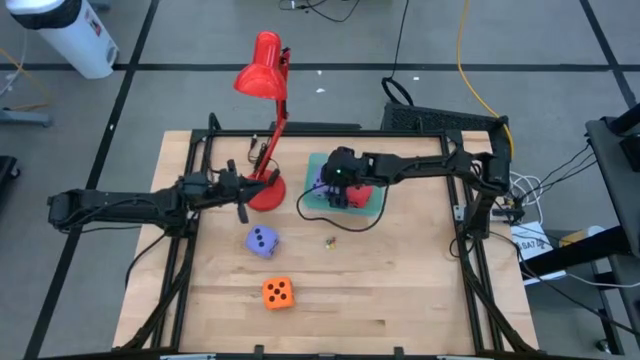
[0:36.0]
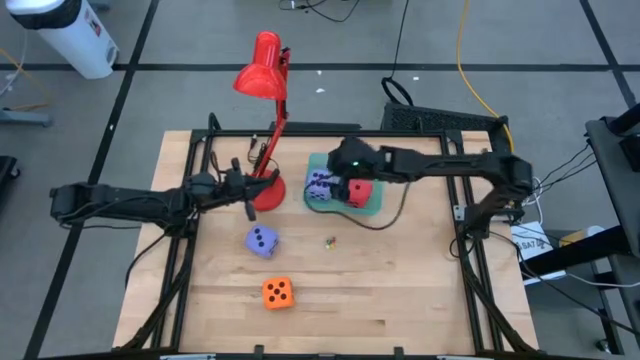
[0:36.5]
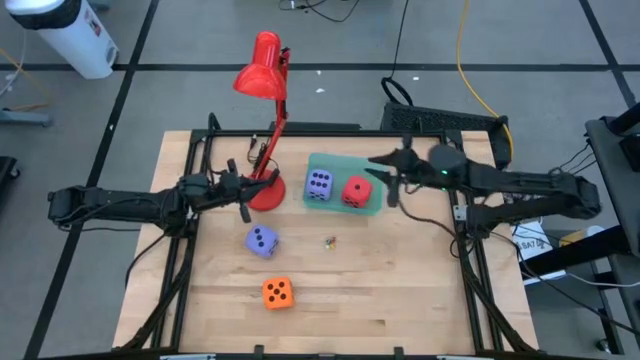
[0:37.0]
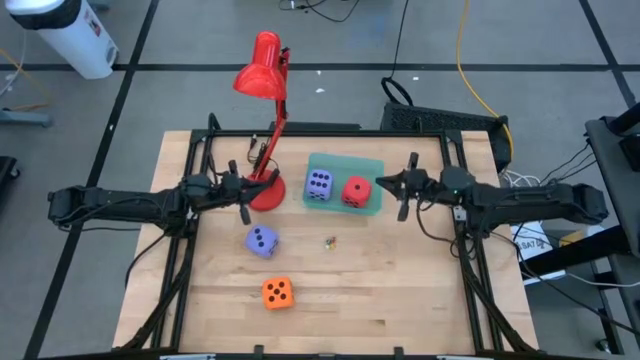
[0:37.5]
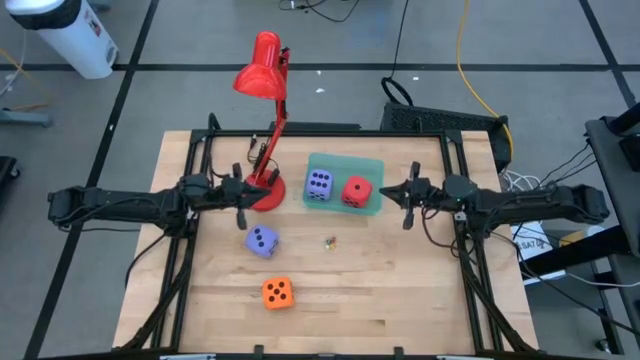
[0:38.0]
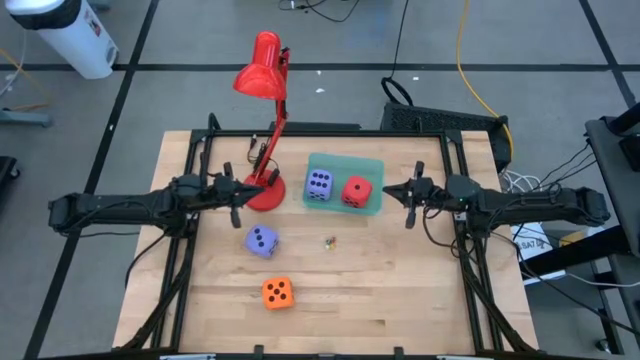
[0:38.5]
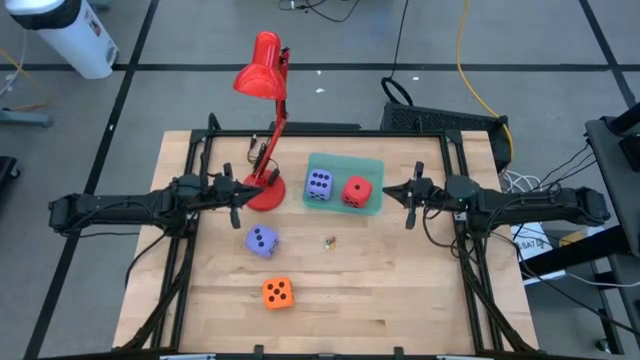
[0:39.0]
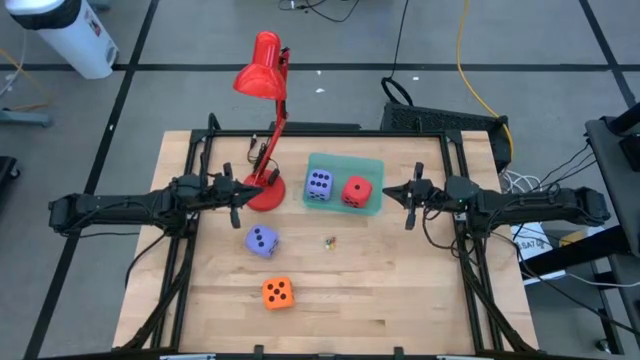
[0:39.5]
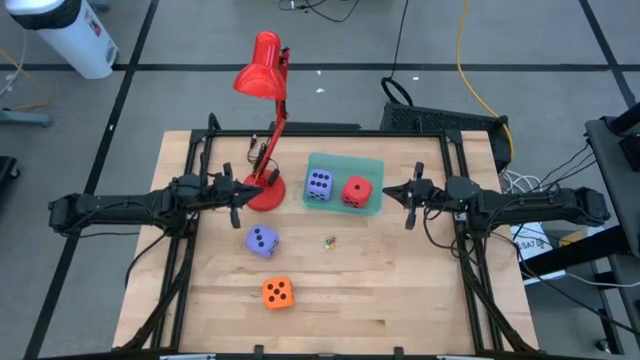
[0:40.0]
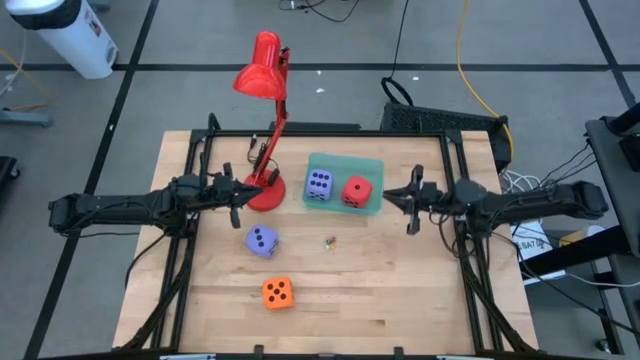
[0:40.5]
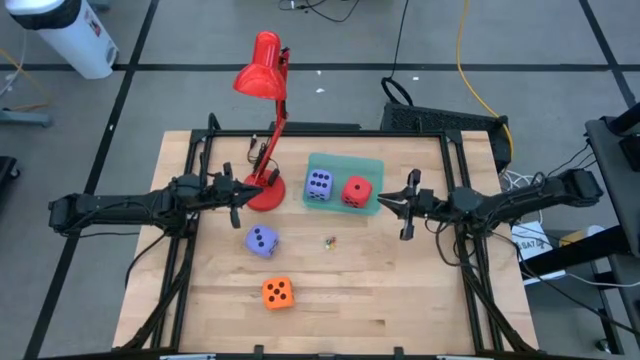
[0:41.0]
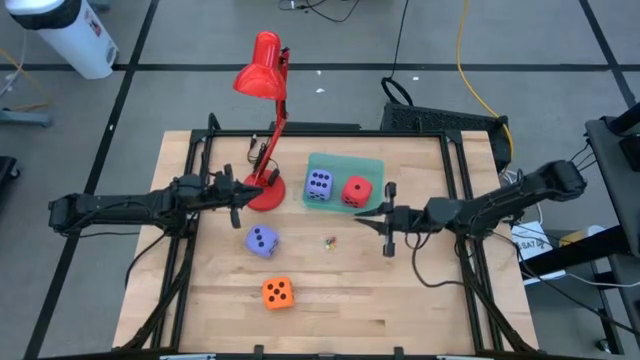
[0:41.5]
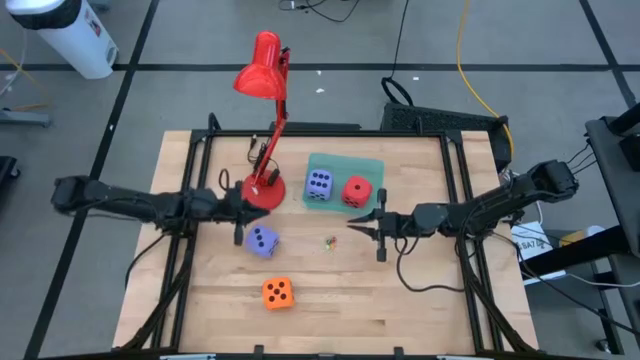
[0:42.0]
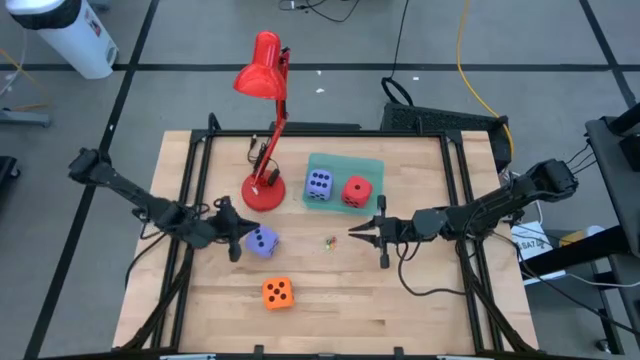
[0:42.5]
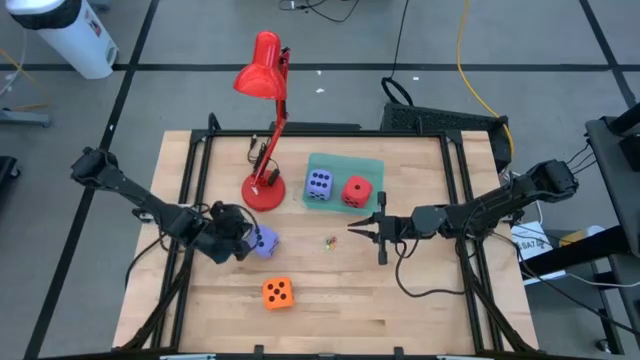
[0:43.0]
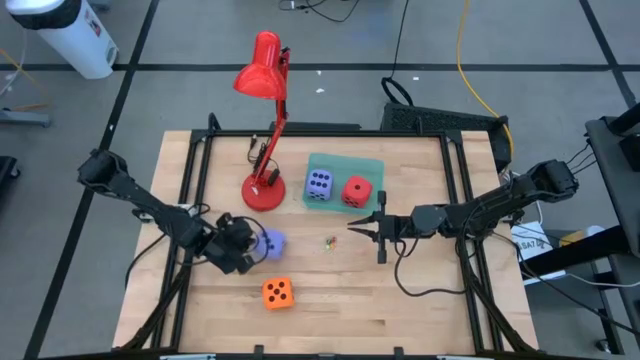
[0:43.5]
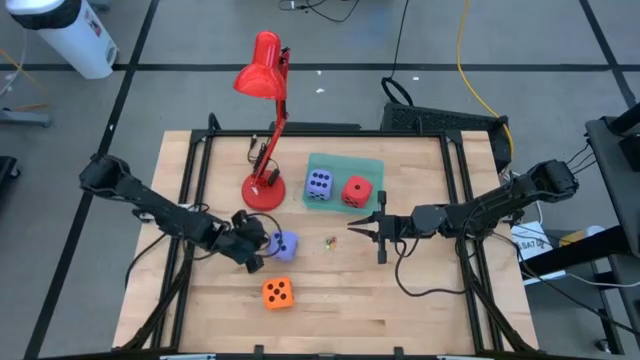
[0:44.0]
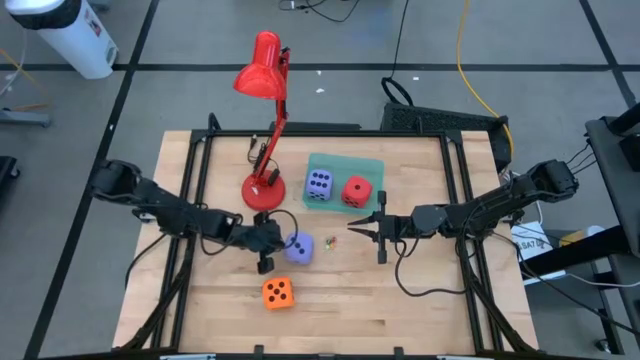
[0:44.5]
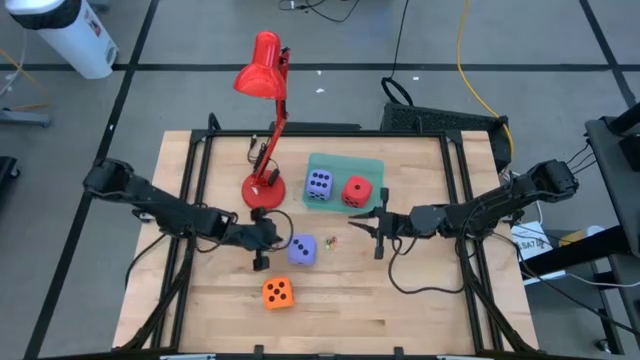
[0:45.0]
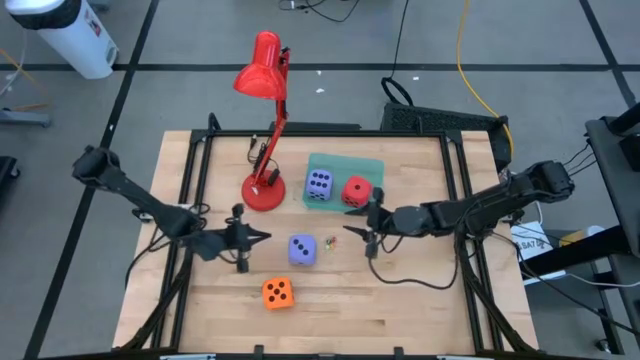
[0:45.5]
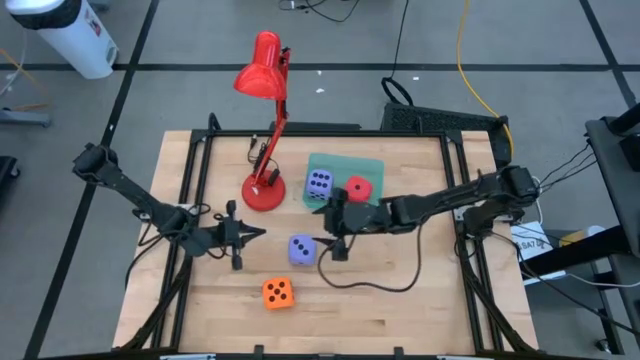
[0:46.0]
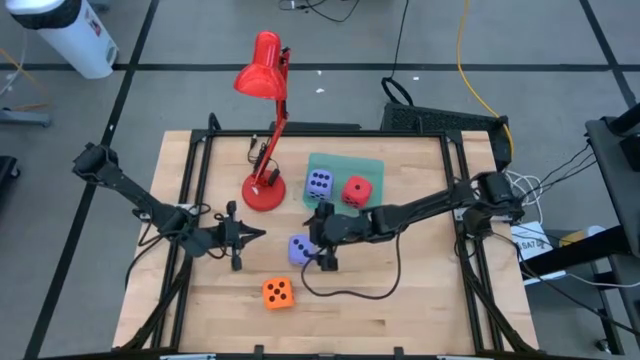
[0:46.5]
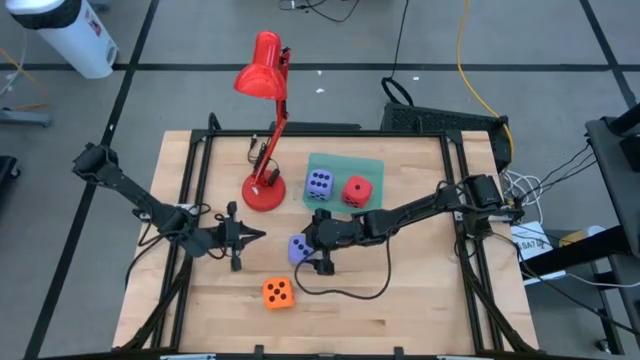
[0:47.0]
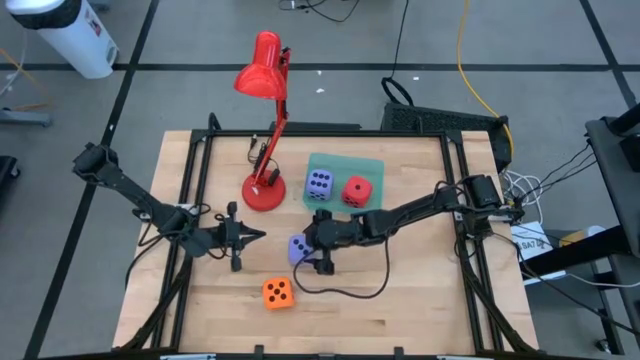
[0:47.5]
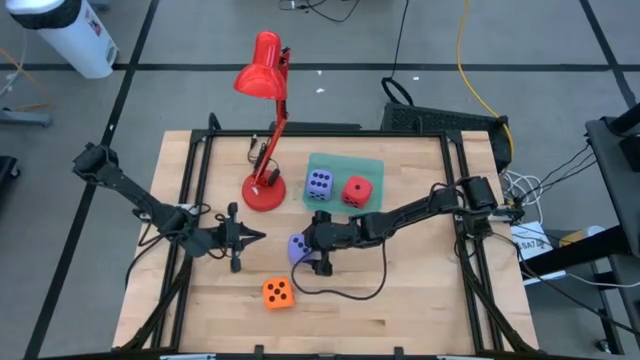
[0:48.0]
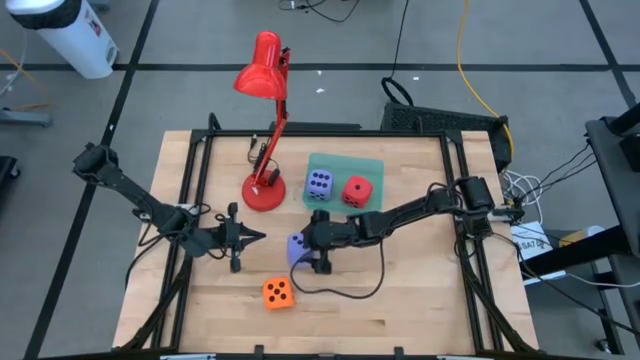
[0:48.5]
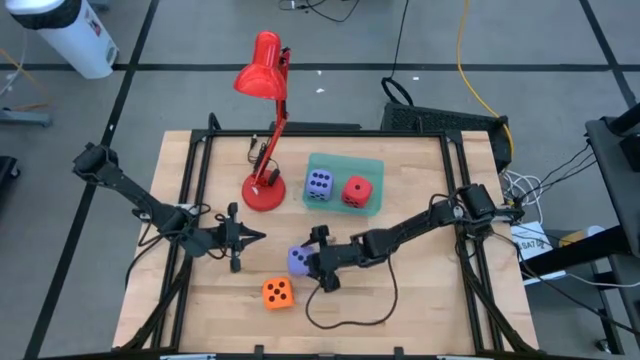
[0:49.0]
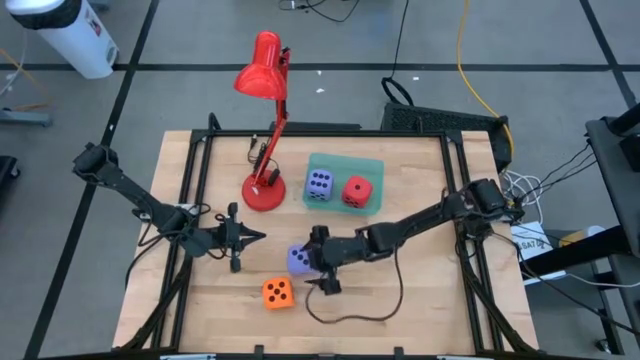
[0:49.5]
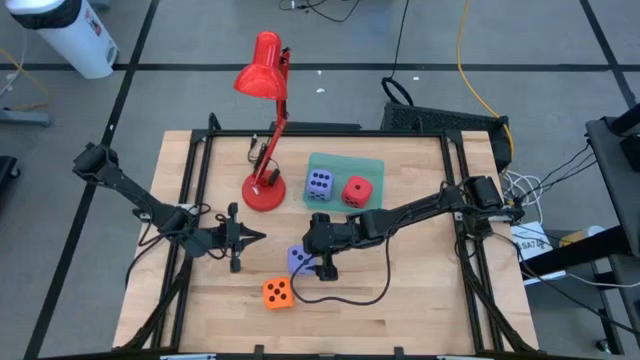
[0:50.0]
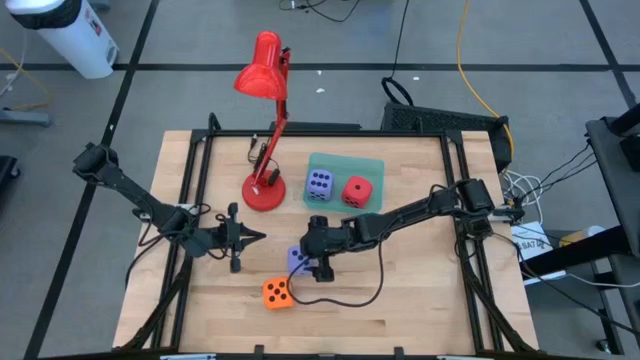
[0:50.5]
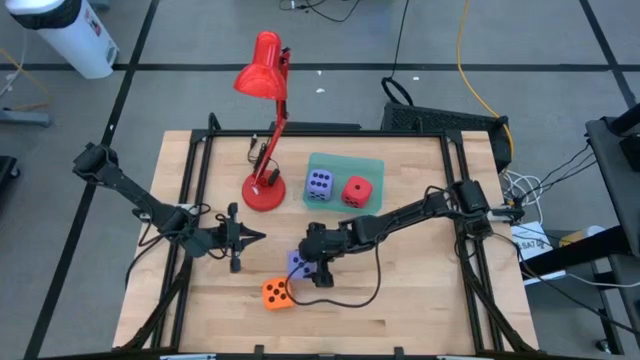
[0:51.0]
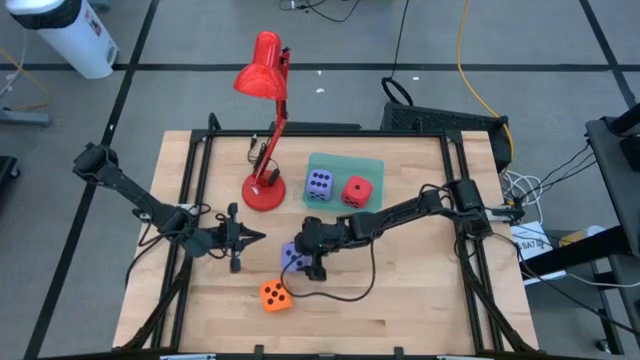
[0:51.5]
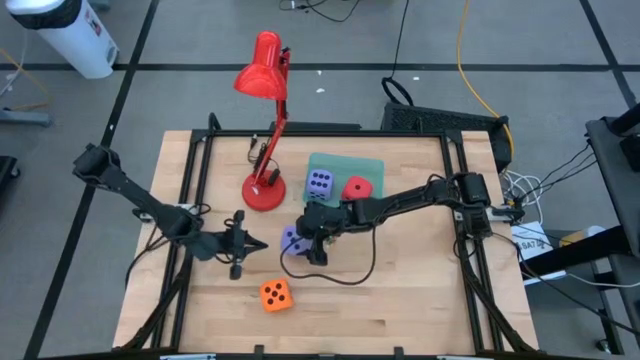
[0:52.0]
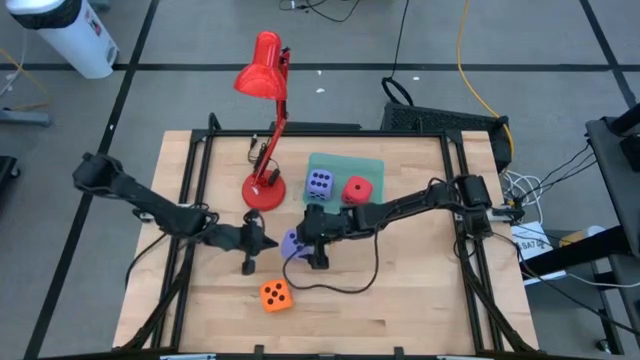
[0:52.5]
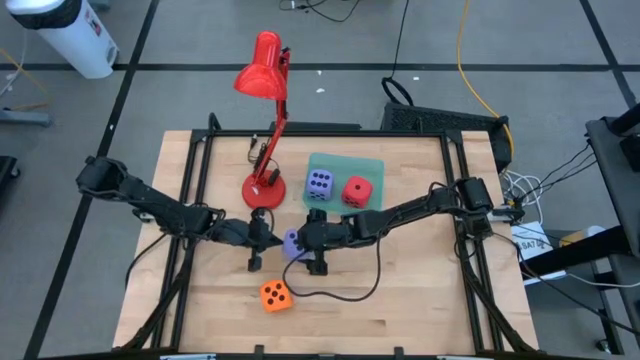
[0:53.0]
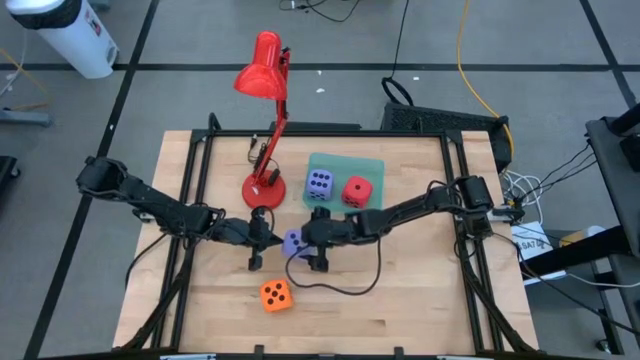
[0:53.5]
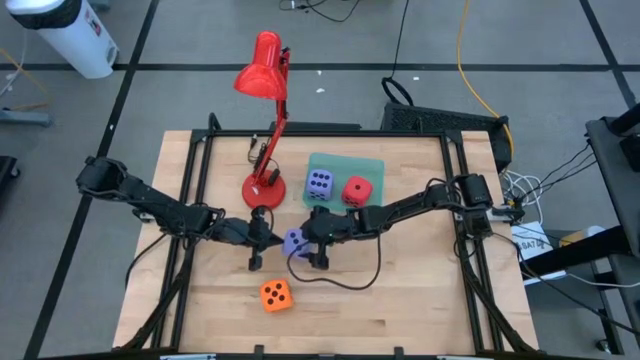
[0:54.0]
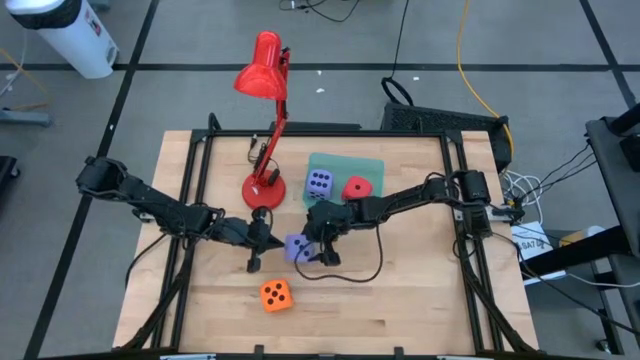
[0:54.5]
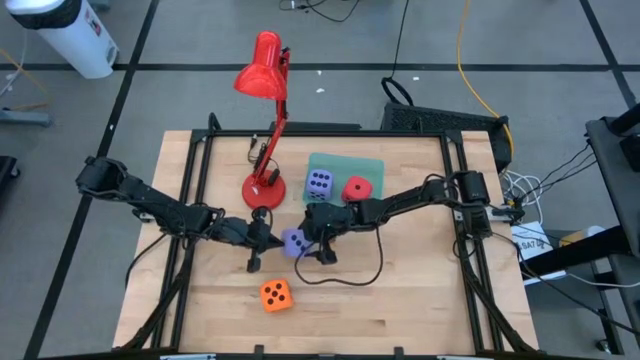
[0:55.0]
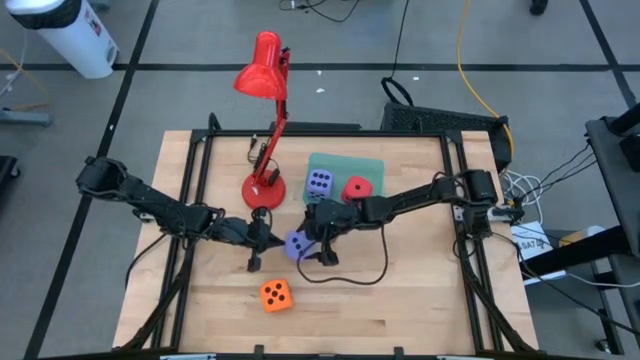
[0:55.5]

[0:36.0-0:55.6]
Task: Pick & Place Dice
Put the large purple die into the blue bin
